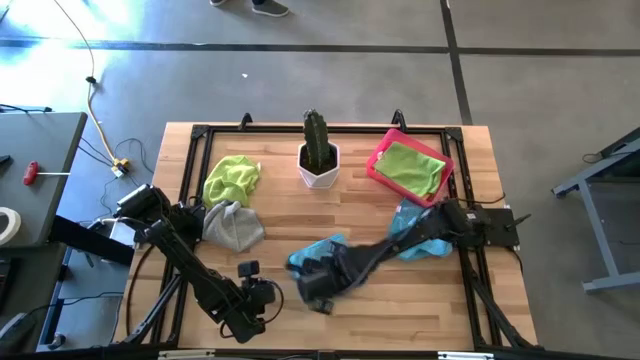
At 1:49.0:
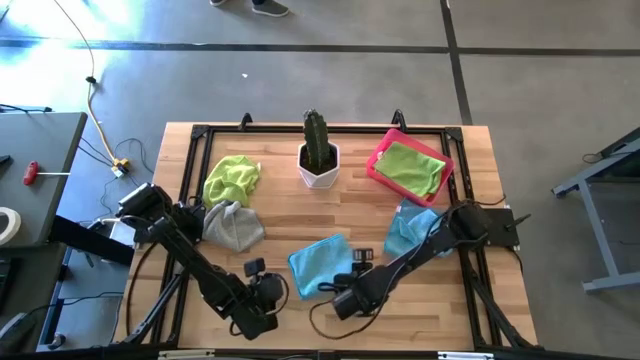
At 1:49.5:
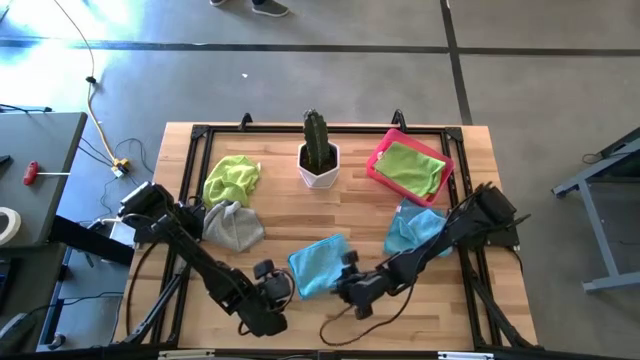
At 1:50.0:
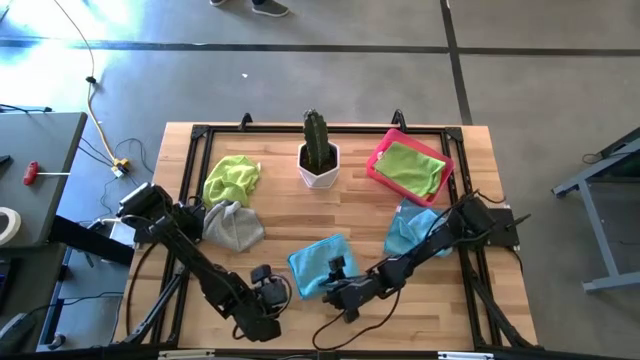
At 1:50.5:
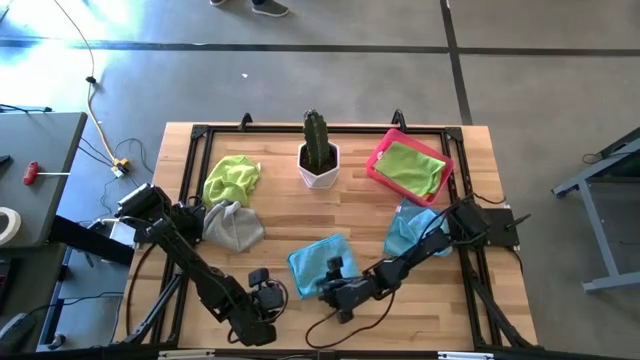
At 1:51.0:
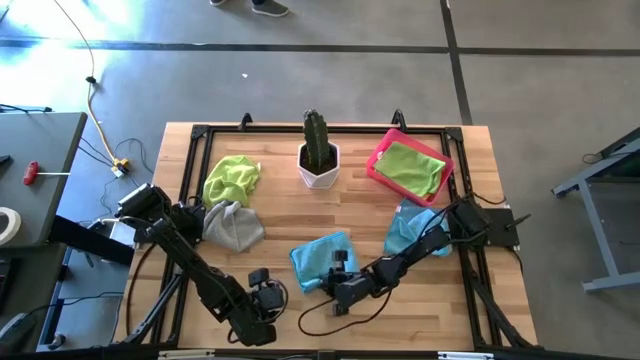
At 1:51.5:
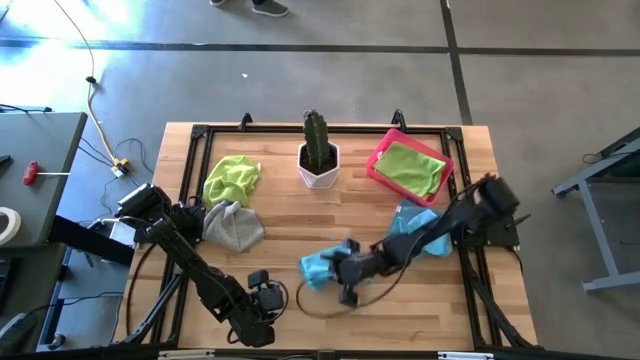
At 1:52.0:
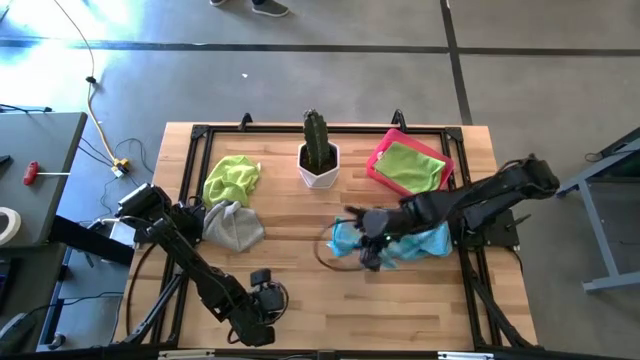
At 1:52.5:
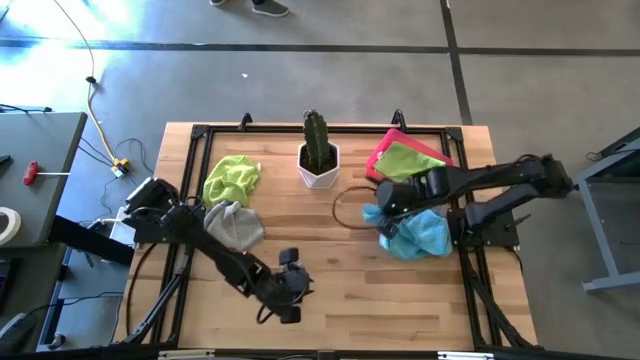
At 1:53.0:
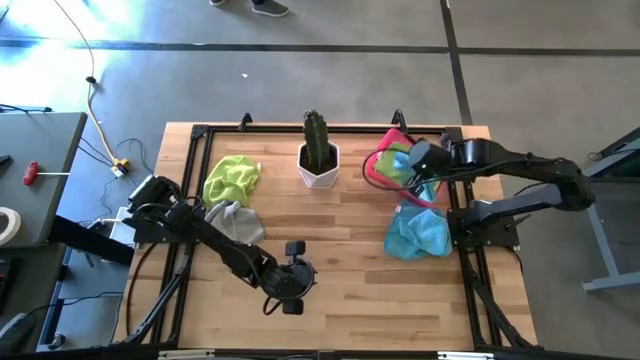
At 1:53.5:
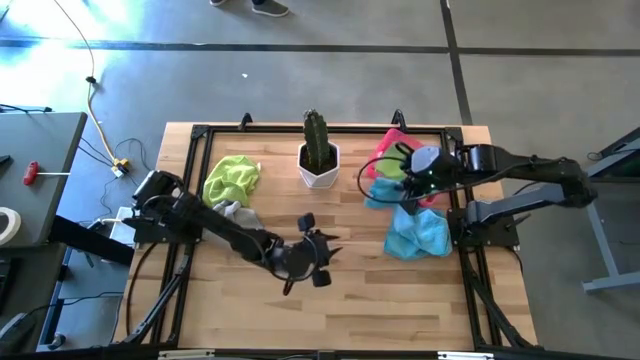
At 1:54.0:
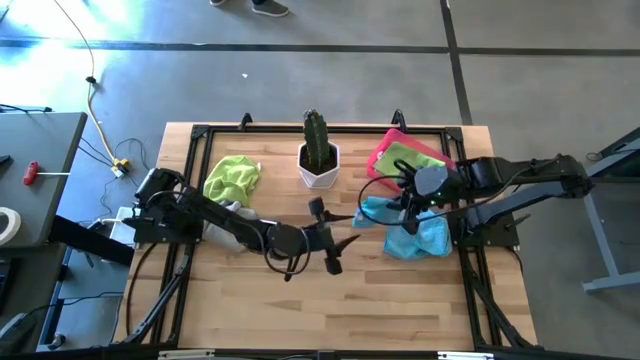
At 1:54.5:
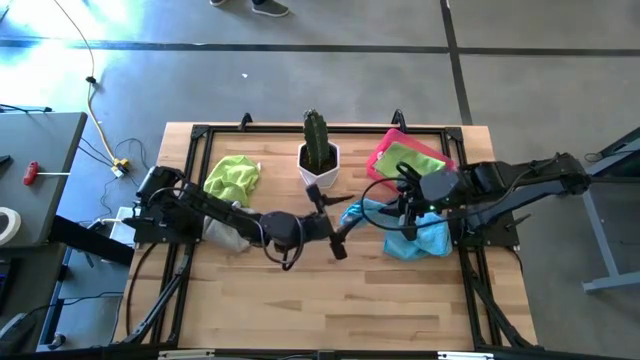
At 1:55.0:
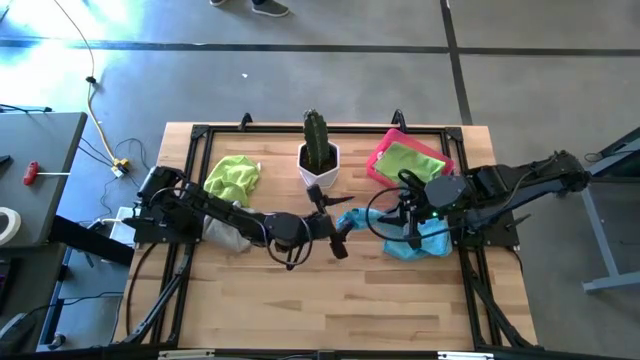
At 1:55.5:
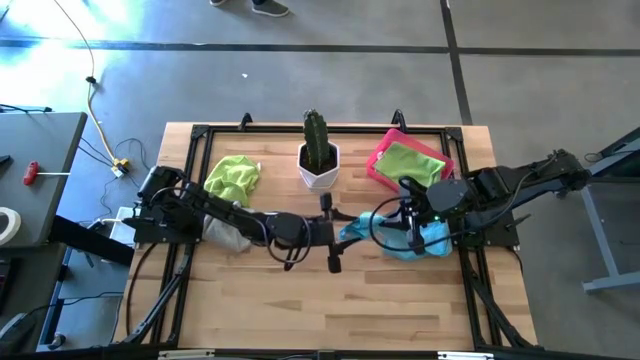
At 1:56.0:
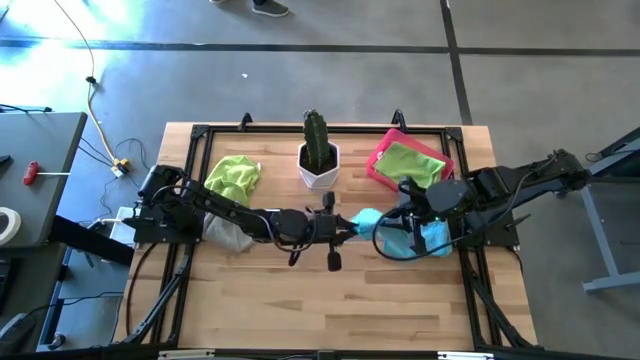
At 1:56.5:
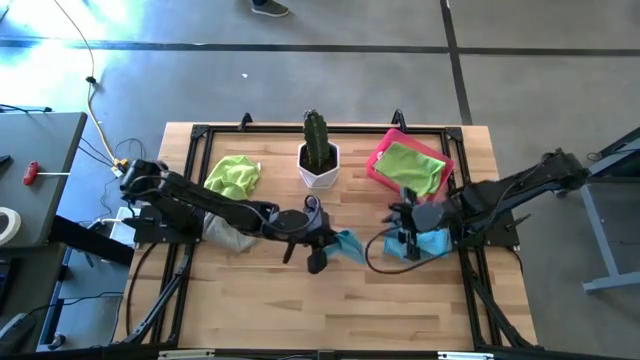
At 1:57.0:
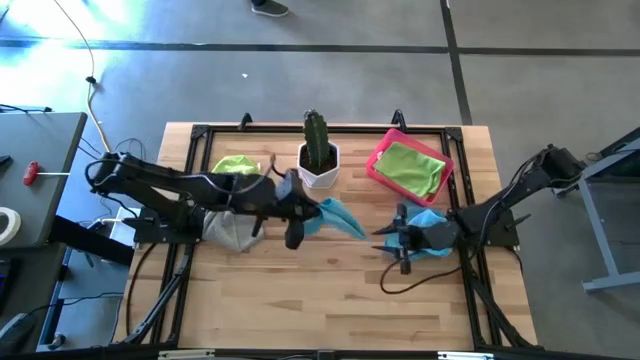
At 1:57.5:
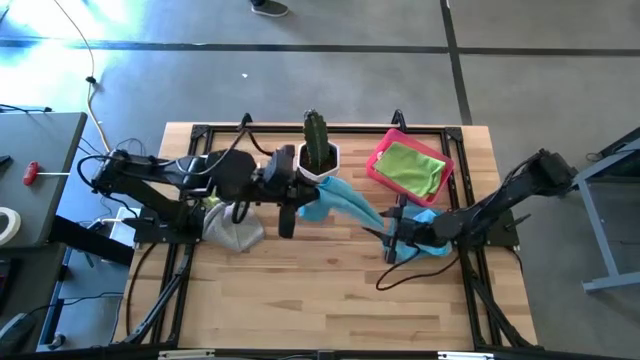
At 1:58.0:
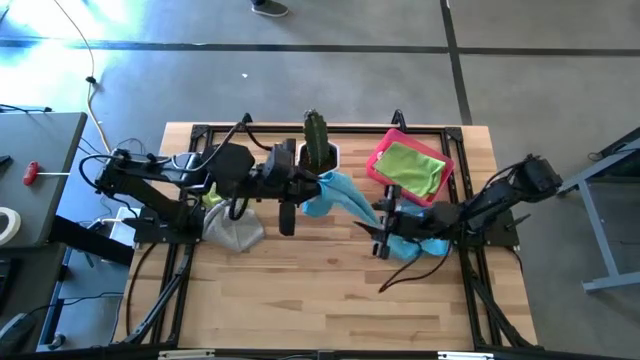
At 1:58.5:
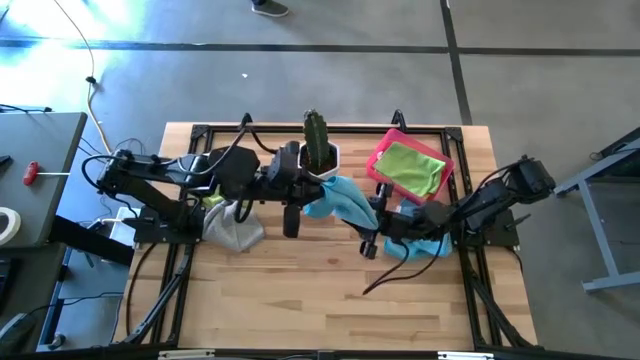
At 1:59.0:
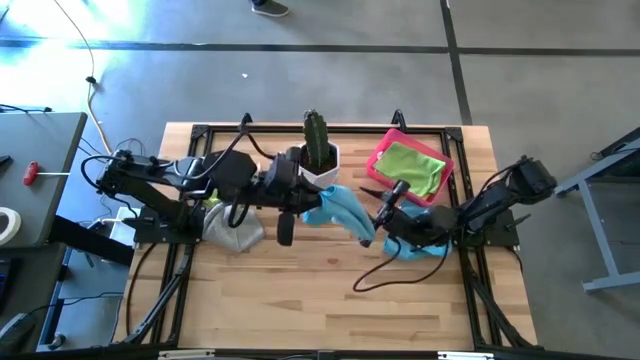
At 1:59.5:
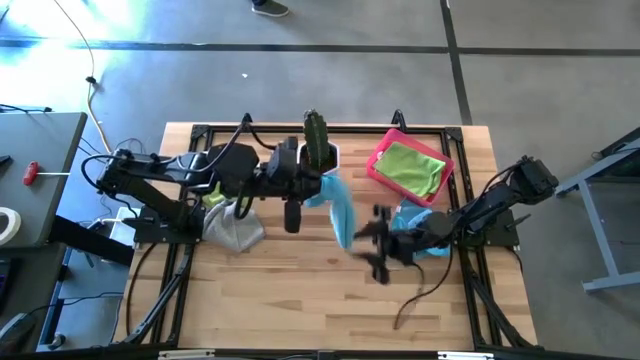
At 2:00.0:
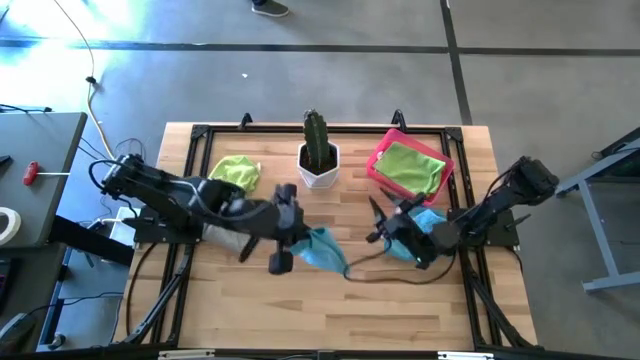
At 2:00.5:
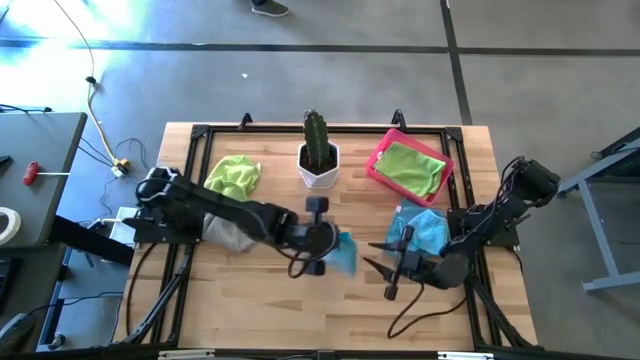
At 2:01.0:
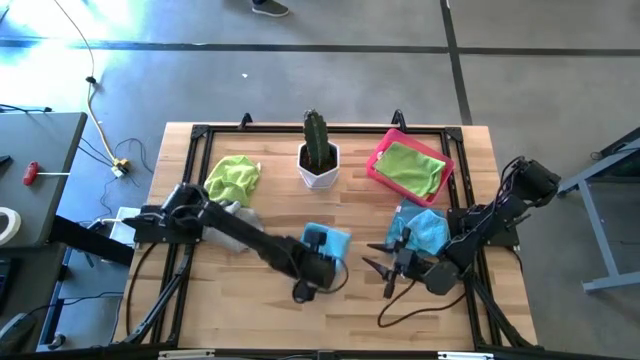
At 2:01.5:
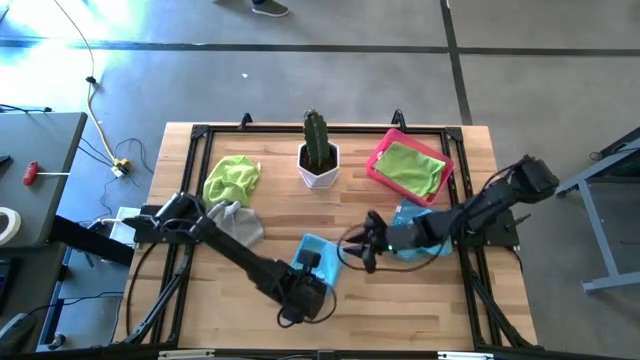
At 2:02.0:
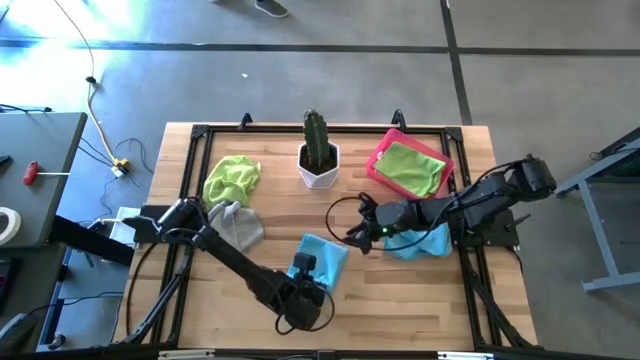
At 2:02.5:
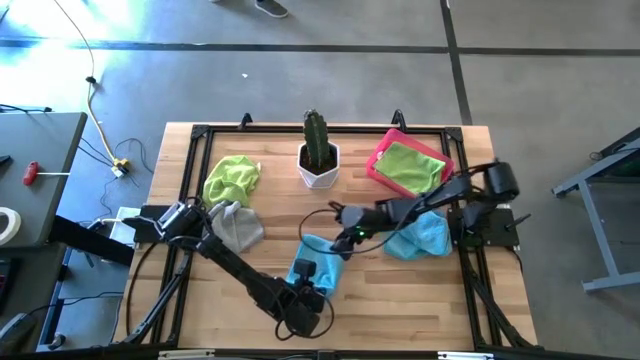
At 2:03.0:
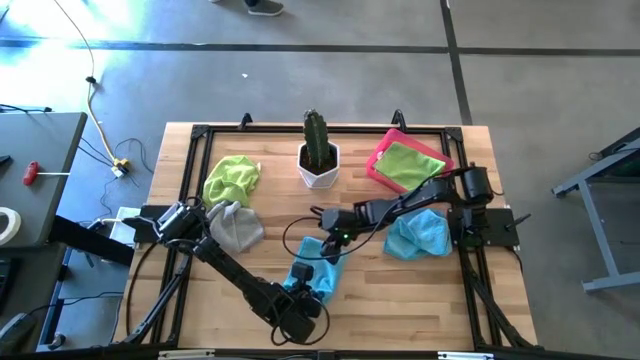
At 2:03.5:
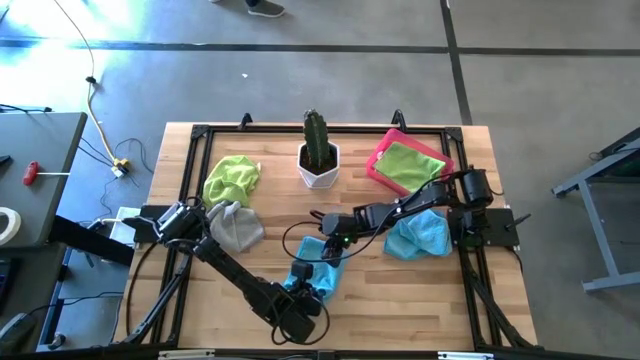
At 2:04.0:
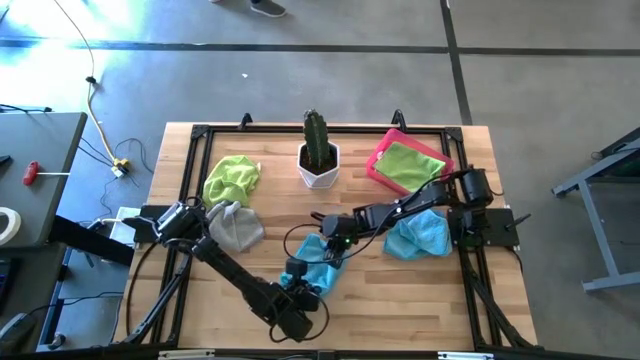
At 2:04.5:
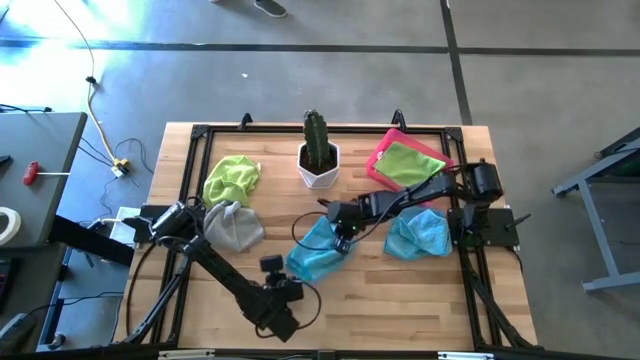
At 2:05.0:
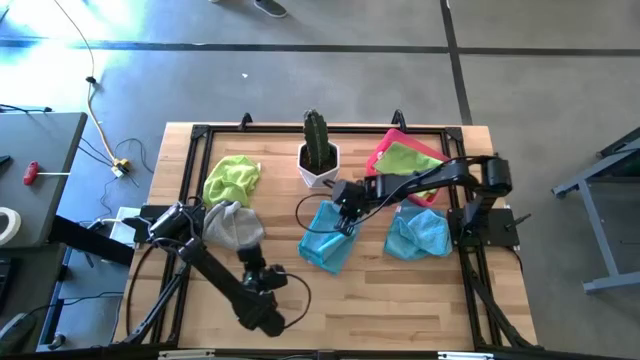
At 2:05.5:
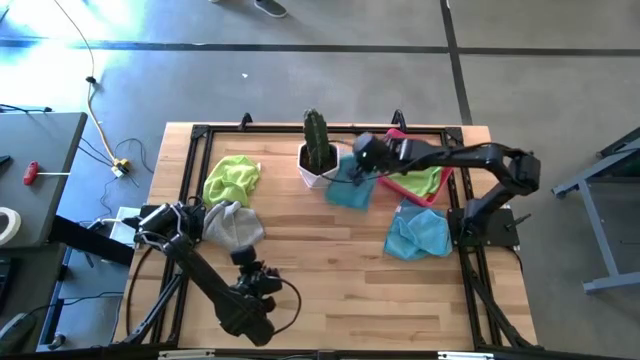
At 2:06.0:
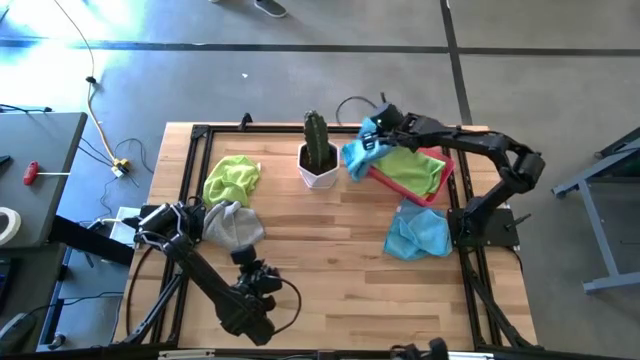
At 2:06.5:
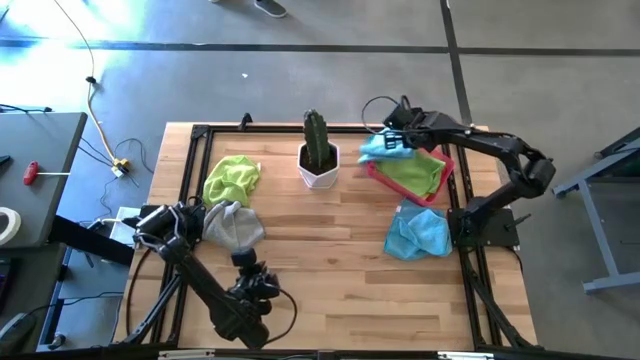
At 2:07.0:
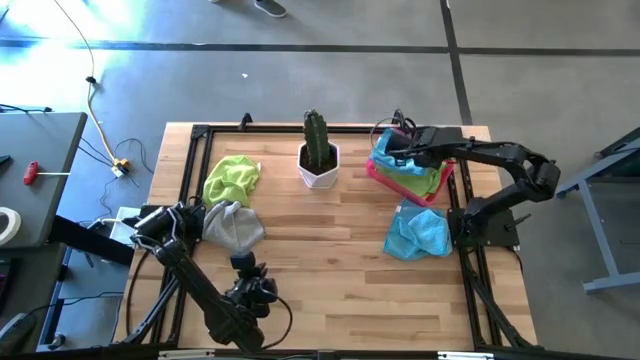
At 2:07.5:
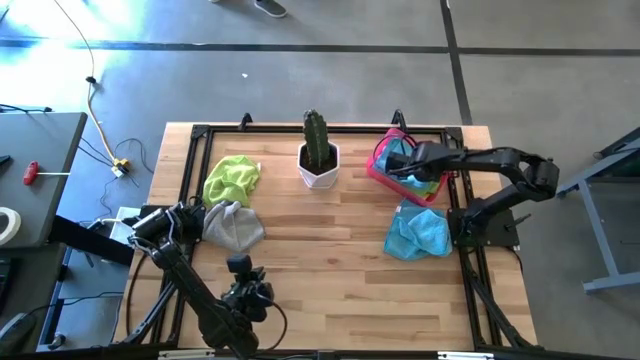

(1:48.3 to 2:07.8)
Task: Fold microfiber towels
Put the blue microfiber towel into the red bin

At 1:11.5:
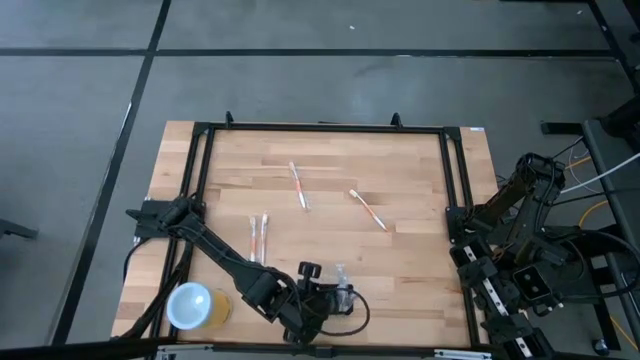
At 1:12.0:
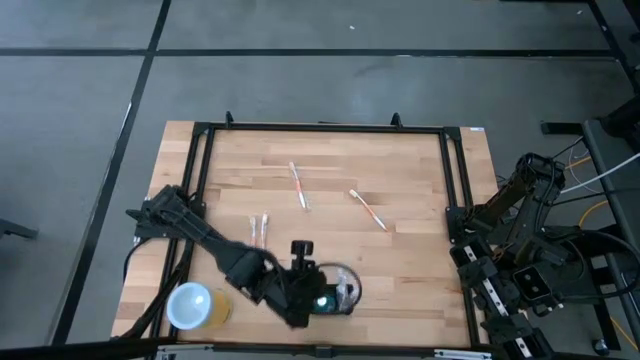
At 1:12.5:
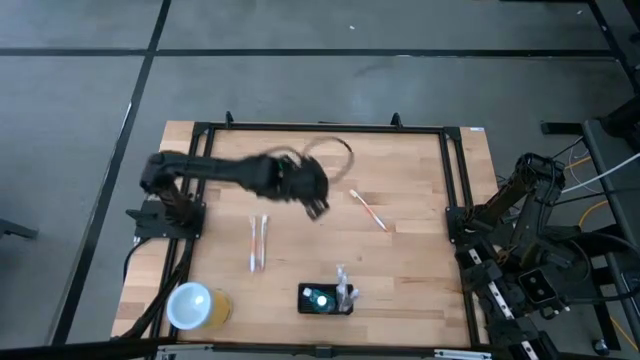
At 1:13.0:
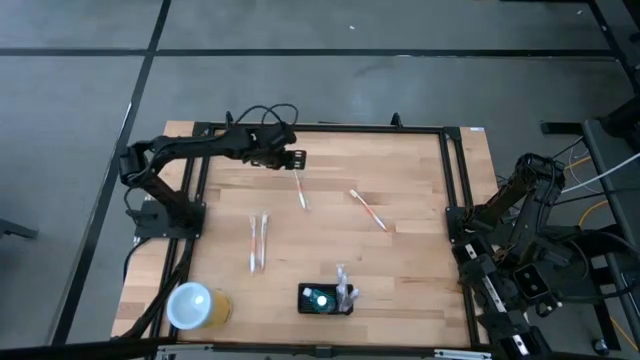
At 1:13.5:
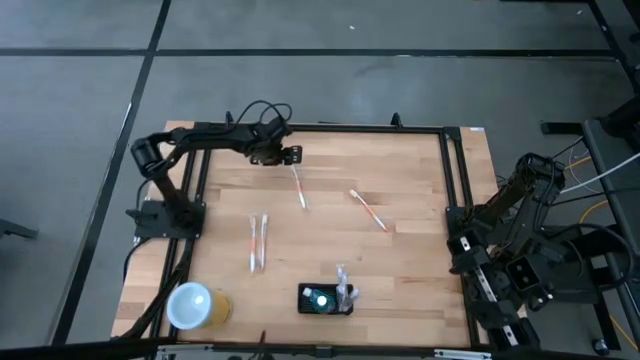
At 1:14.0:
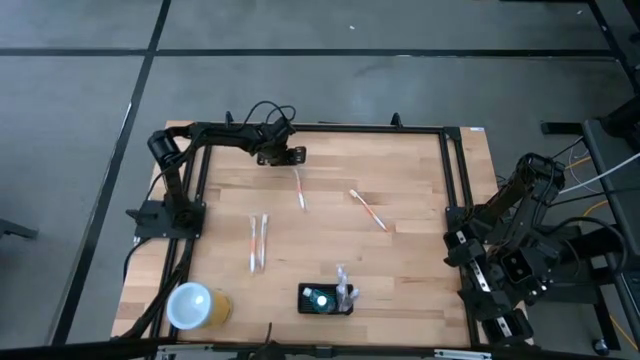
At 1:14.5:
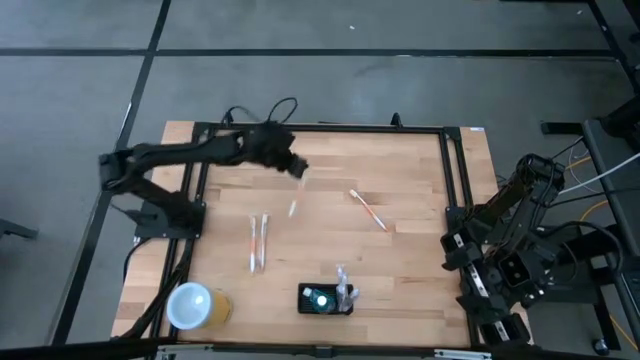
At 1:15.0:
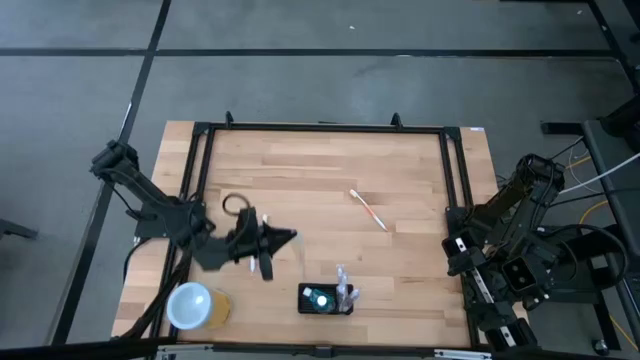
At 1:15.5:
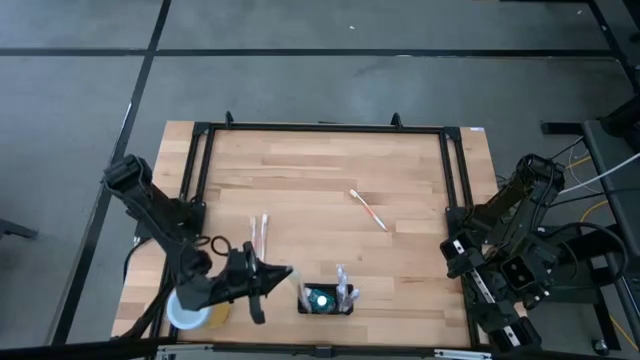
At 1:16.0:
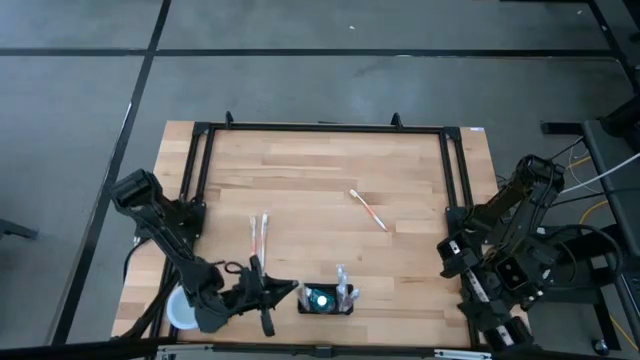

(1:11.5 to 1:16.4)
Task: Pick & Place toothbrushing station
Put the orange toothbrush into the mesh organizer
